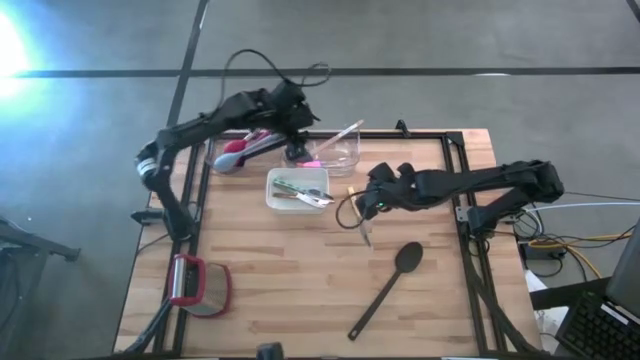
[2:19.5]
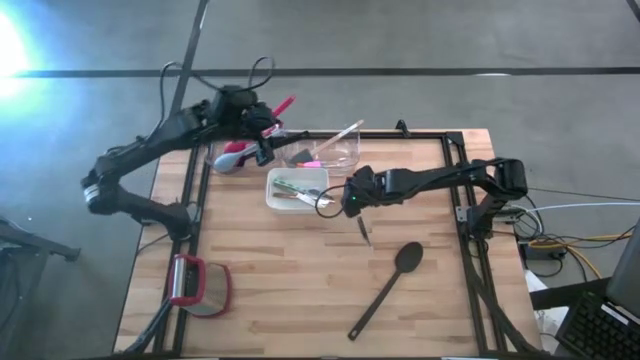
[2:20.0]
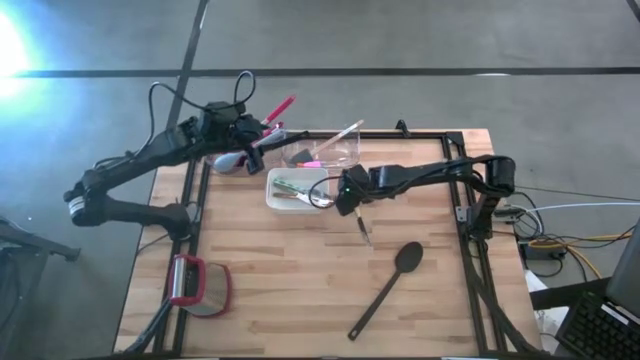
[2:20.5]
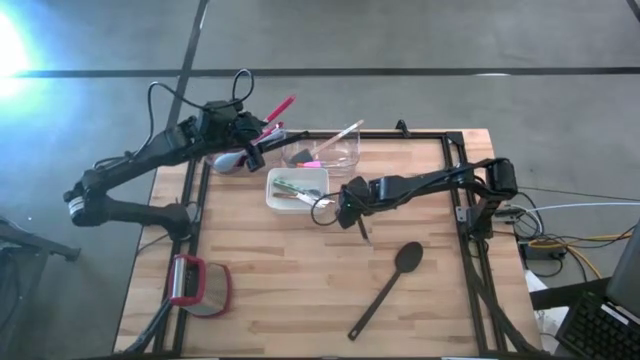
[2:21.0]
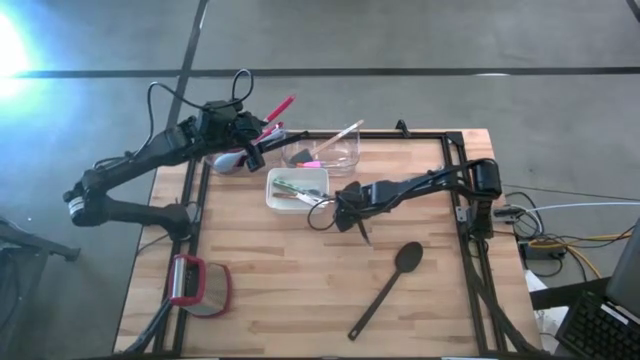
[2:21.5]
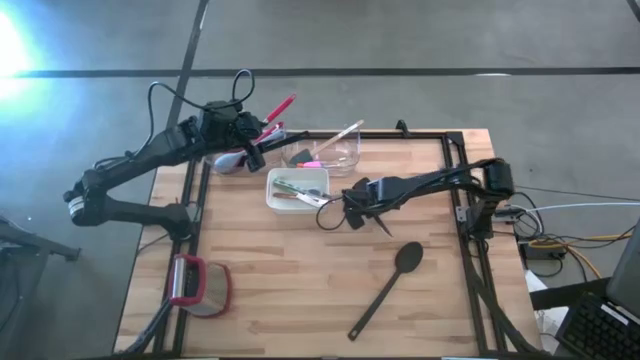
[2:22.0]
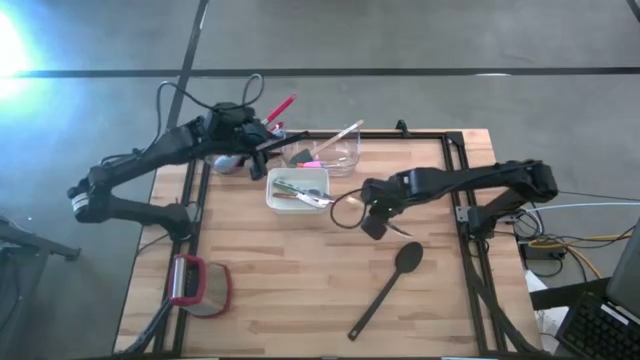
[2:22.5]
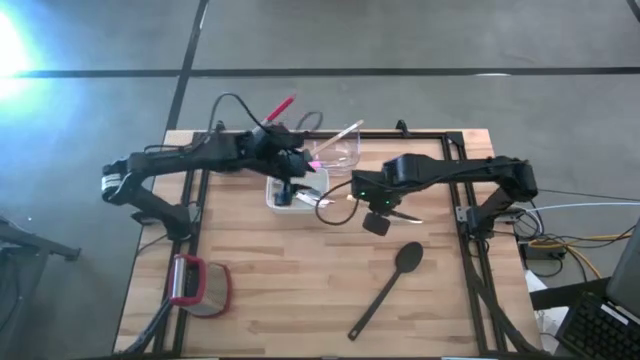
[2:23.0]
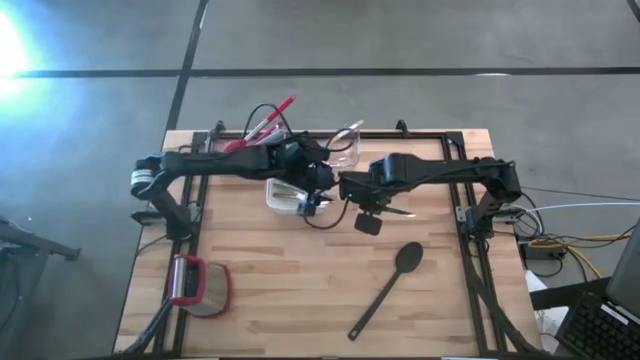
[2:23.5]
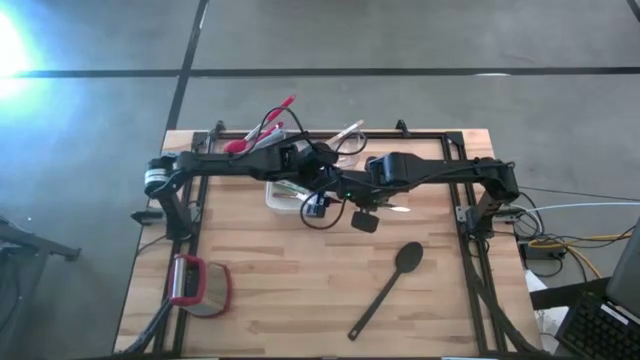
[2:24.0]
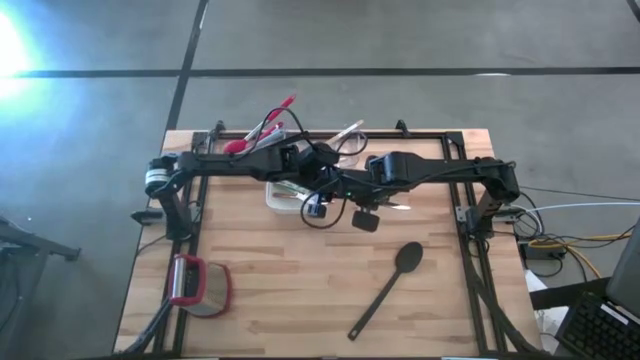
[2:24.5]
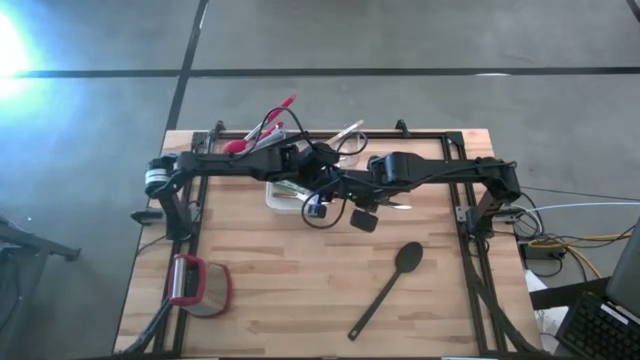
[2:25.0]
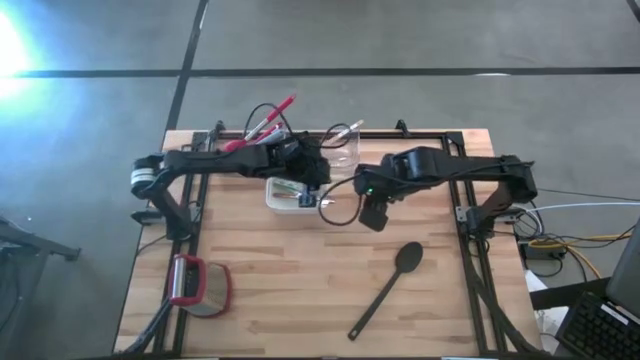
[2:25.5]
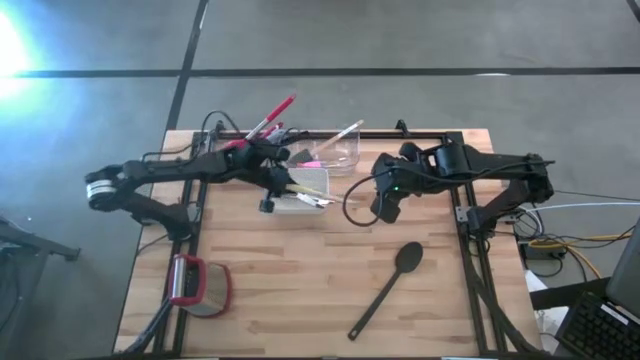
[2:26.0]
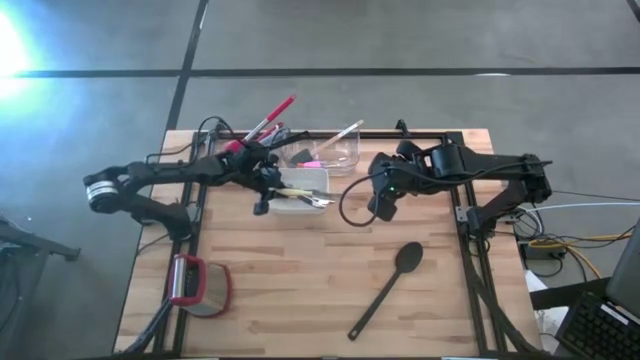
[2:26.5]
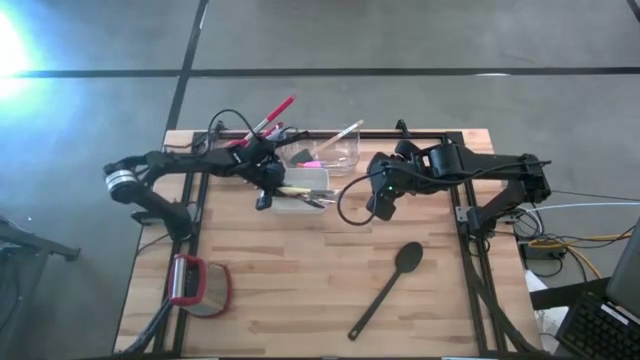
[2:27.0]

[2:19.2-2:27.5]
Task: Pick & Place Kitchen Items
Put the yellow knife into the white bin

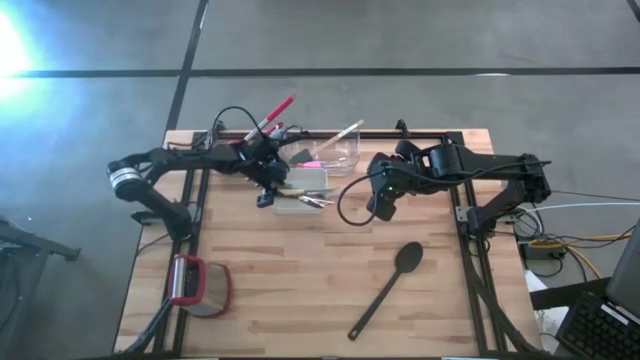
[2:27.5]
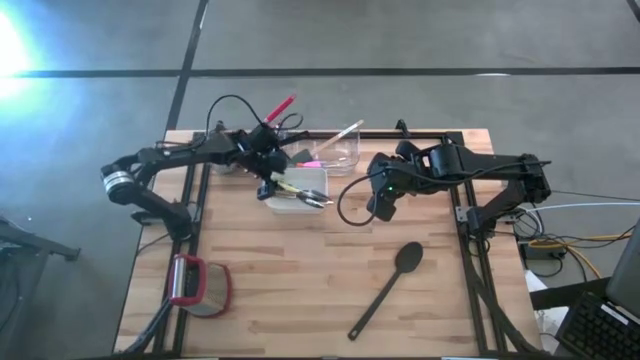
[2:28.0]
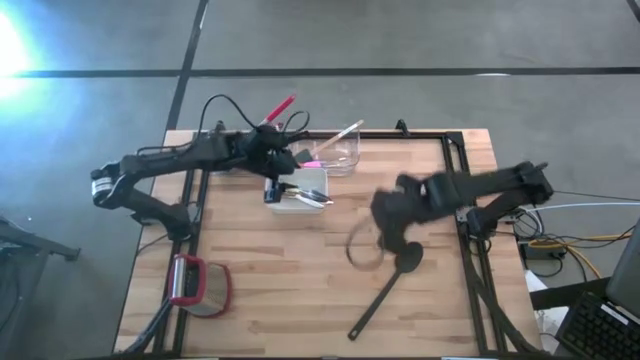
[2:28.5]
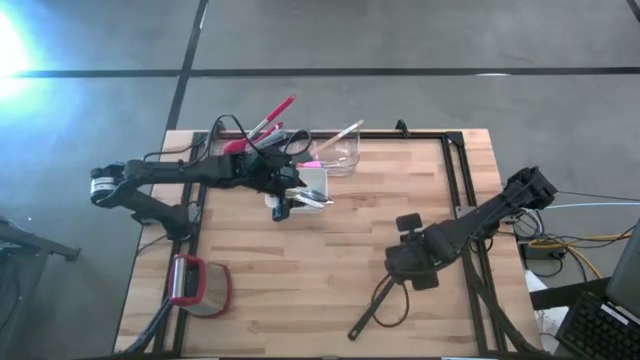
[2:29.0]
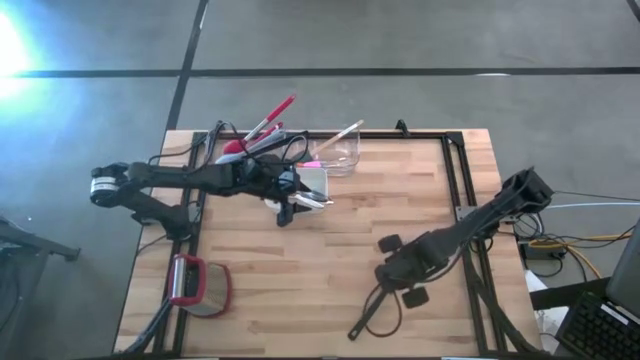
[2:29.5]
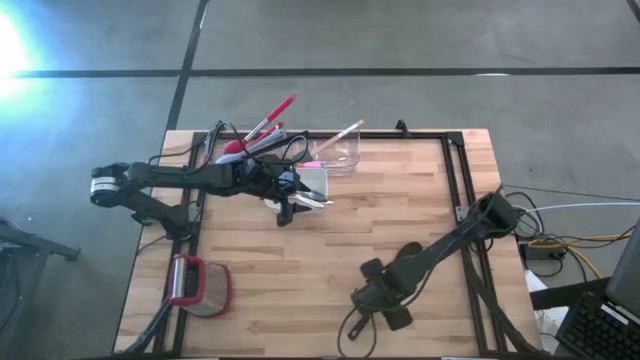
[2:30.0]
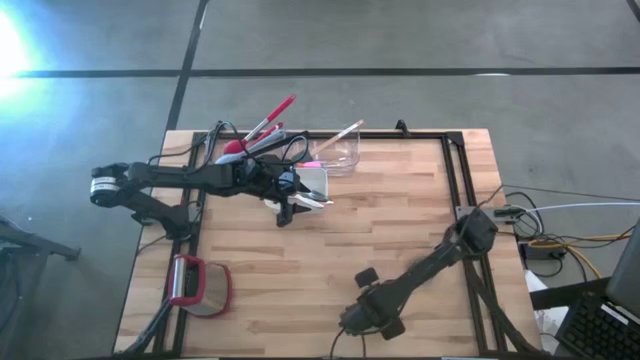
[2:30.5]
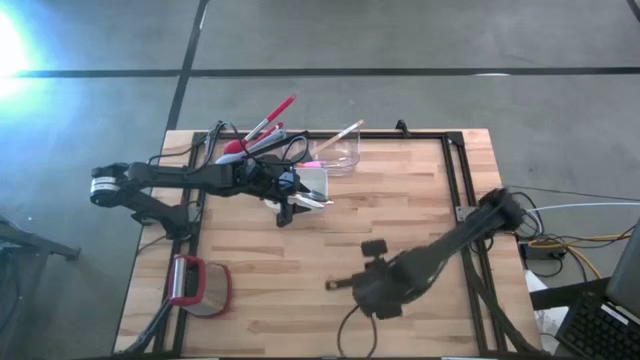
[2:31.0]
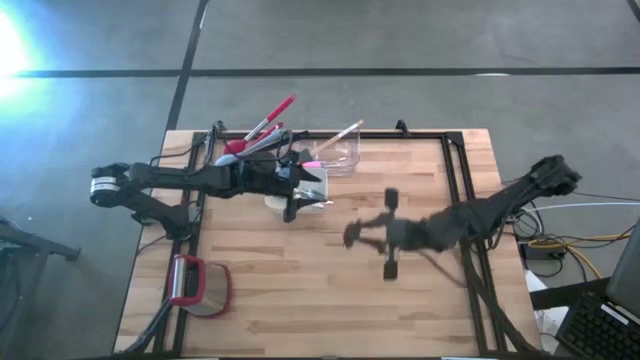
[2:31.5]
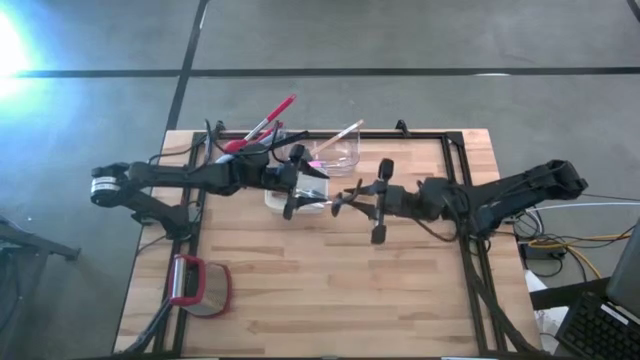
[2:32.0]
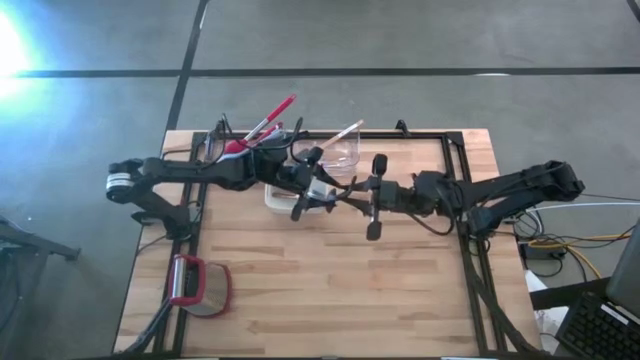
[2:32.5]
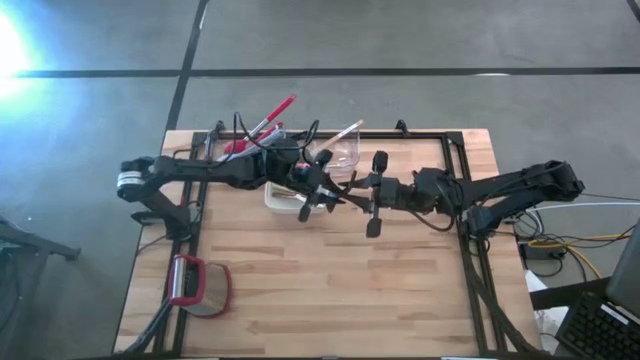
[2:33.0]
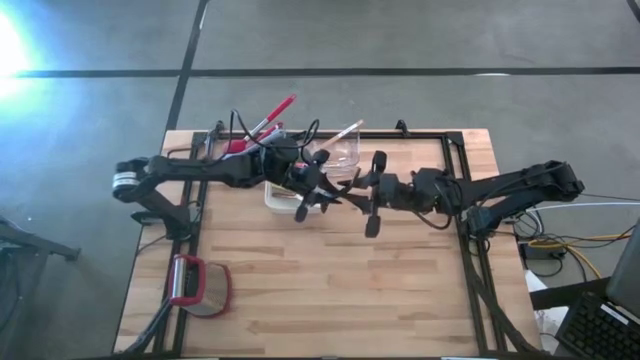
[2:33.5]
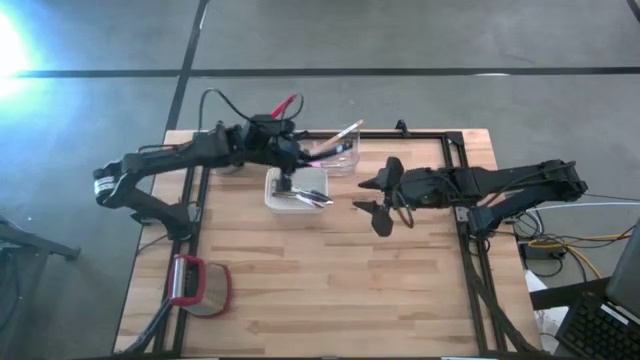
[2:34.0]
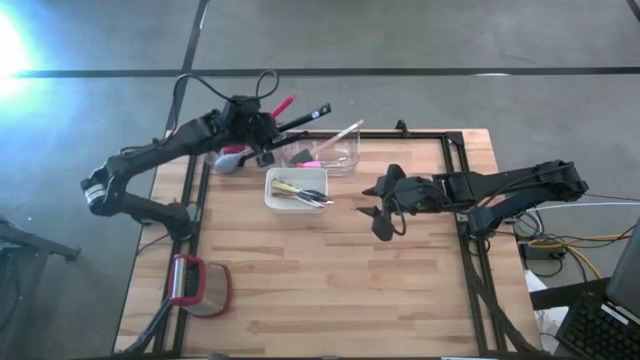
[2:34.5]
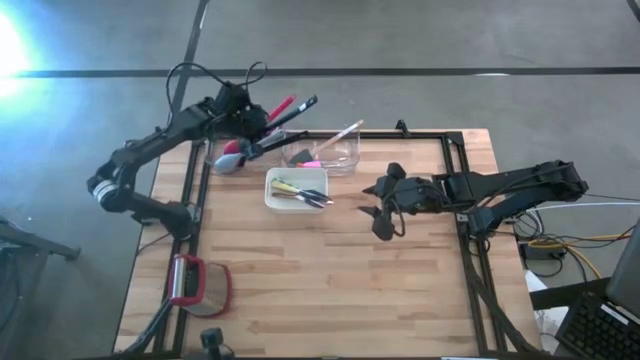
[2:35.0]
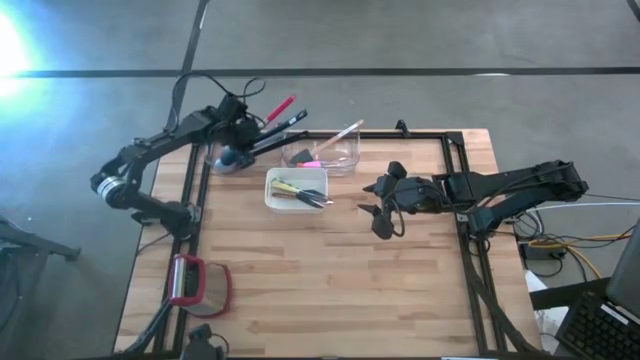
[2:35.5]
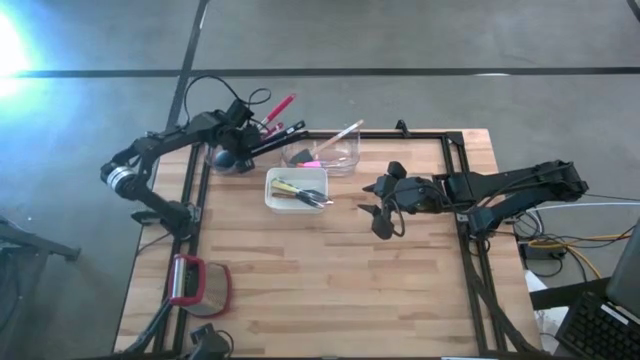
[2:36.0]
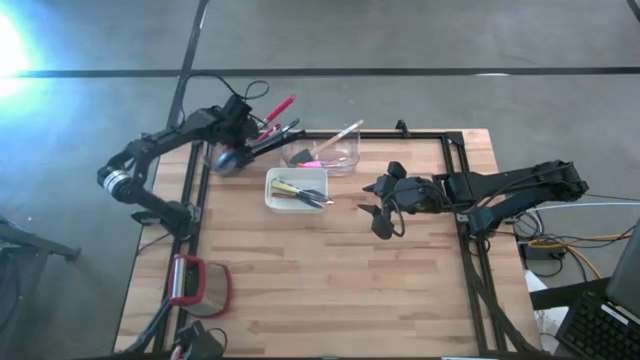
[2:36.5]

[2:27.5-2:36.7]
Put the black serving spoon into the left transparent bin

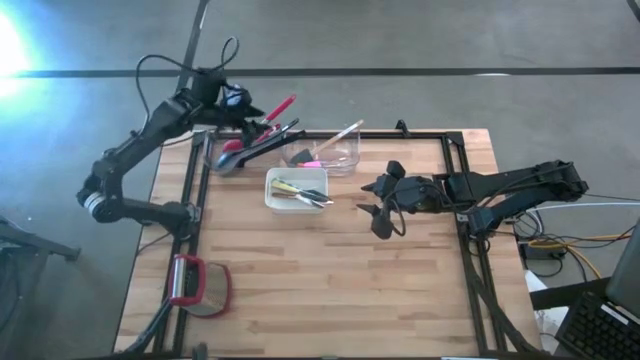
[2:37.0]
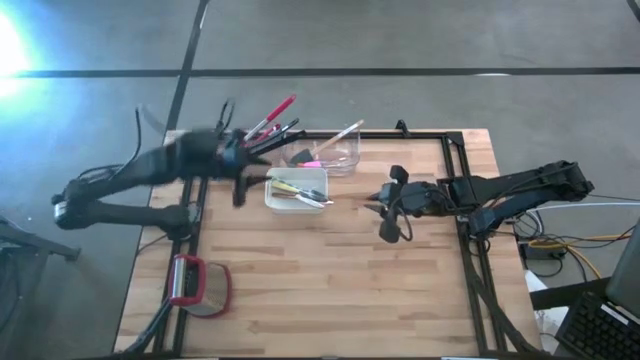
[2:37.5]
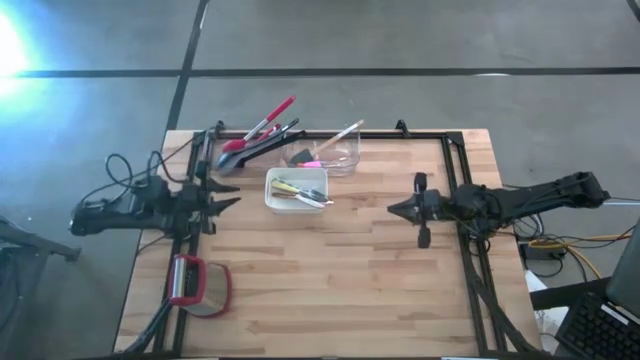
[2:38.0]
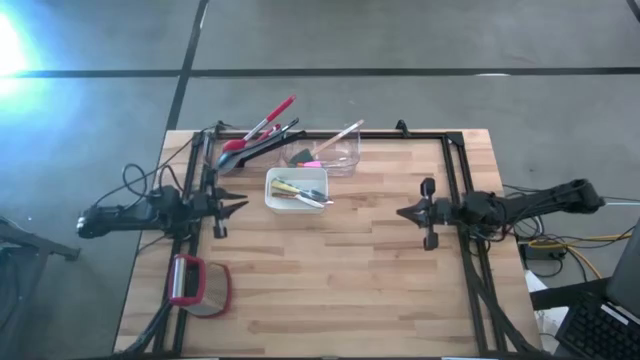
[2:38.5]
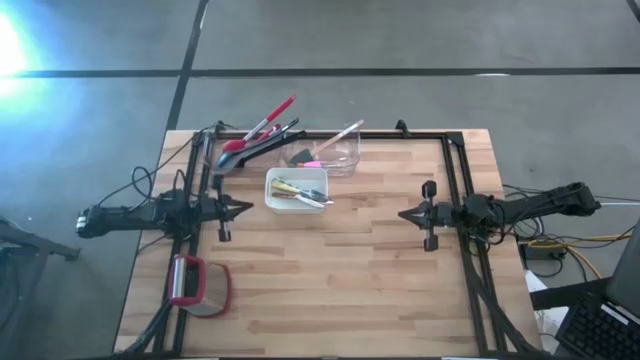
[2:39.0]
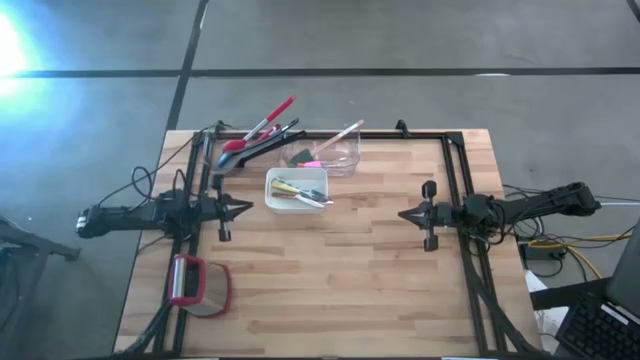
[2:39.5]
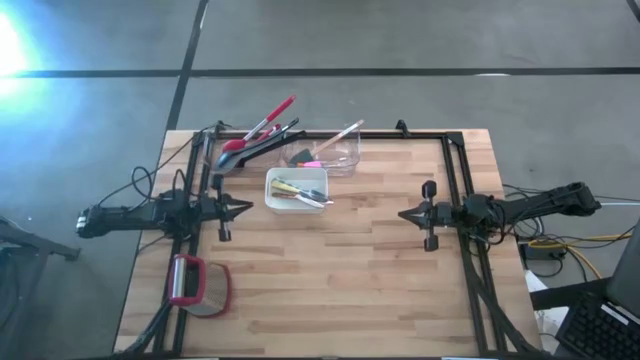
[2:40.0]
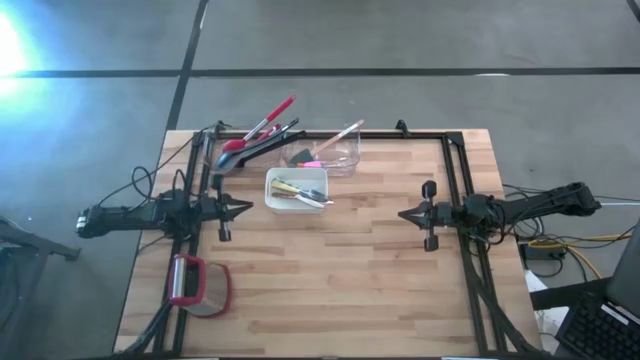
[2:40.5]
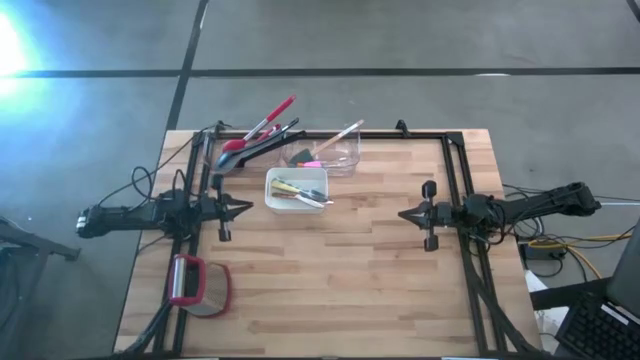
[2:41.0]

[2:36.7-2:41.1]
Return to Home Position
